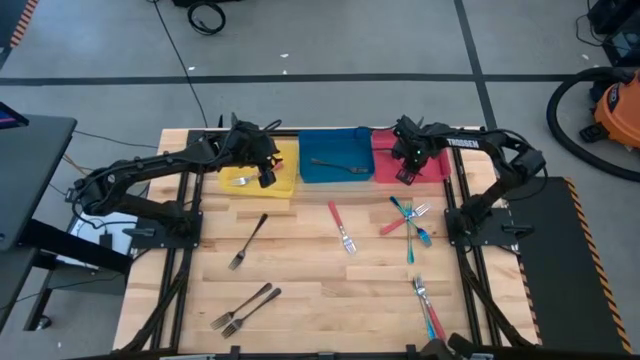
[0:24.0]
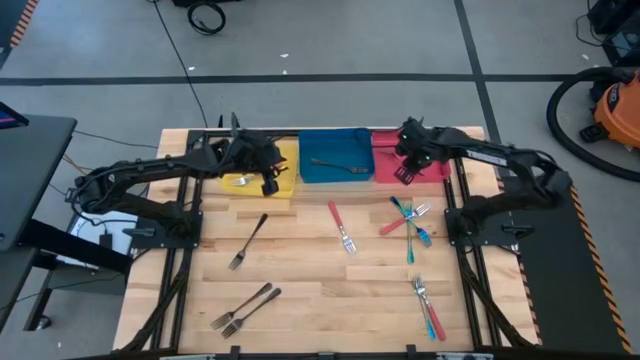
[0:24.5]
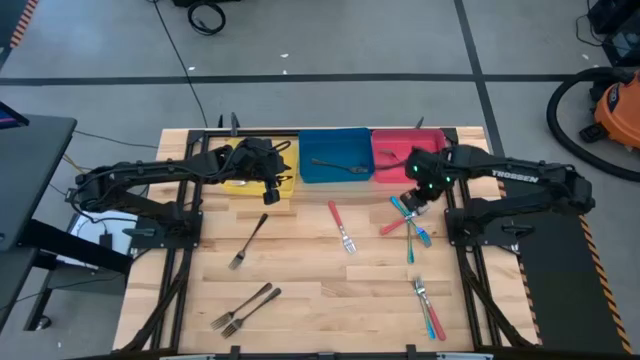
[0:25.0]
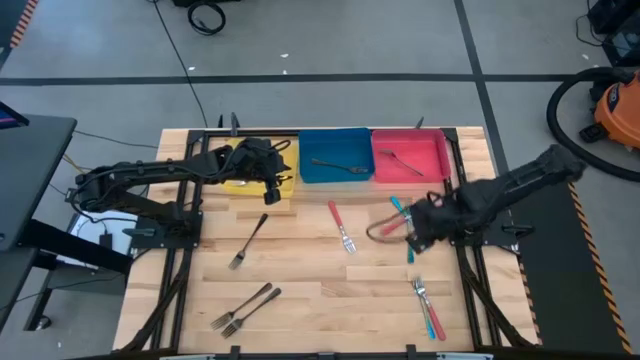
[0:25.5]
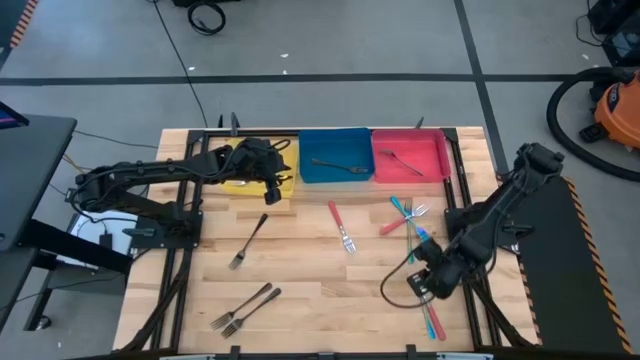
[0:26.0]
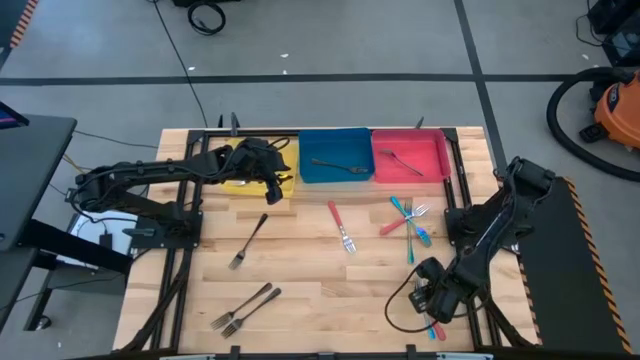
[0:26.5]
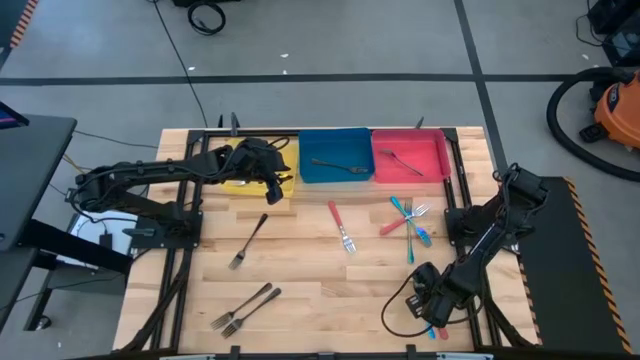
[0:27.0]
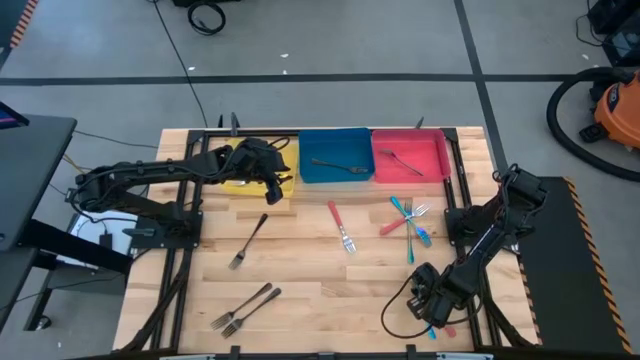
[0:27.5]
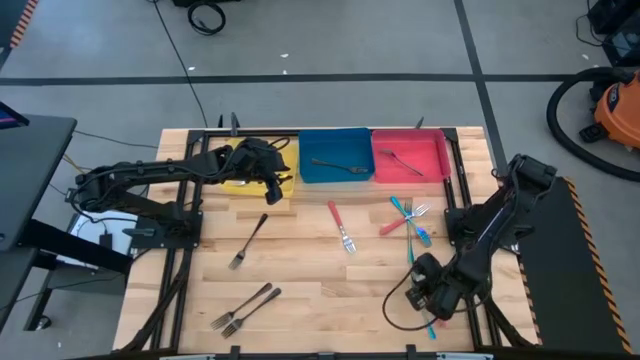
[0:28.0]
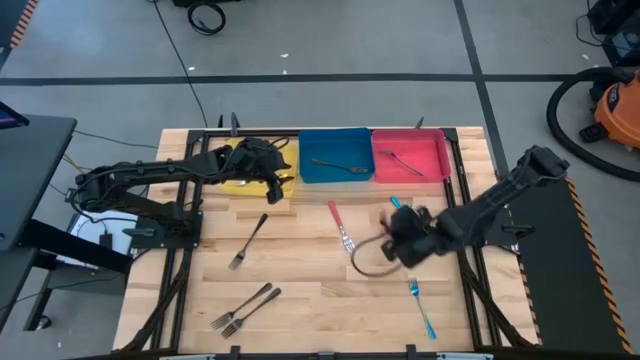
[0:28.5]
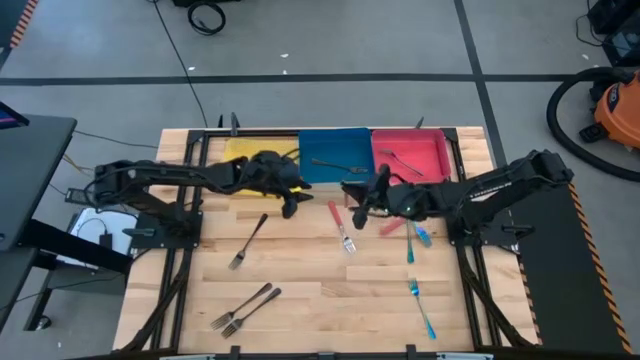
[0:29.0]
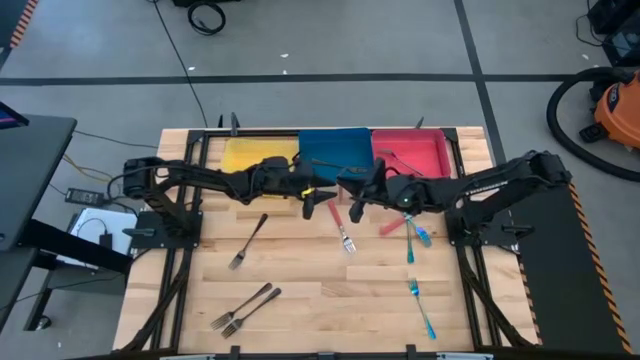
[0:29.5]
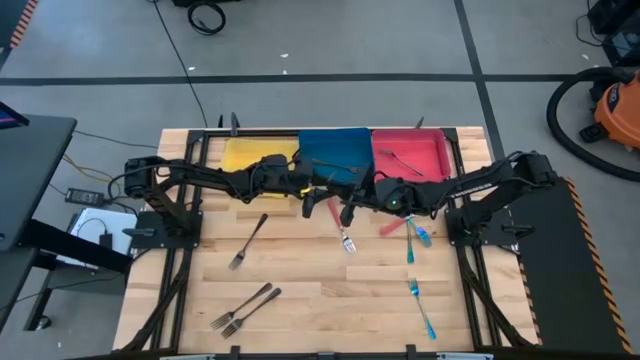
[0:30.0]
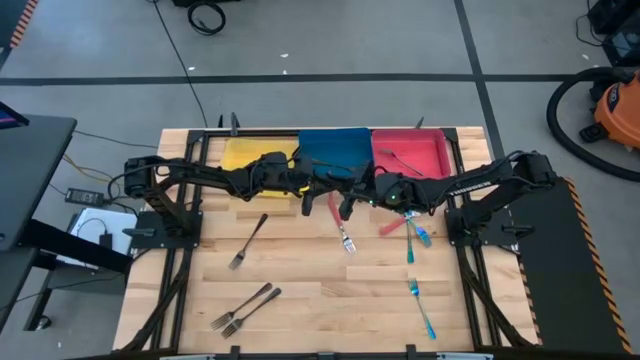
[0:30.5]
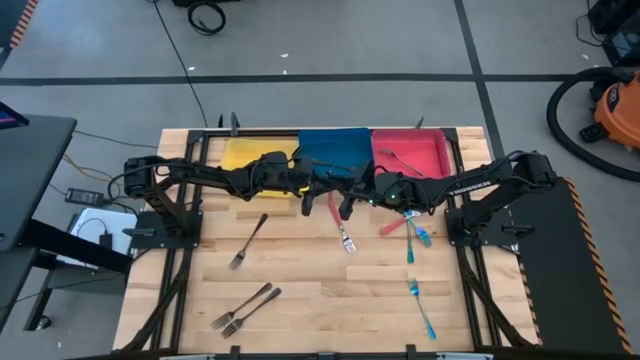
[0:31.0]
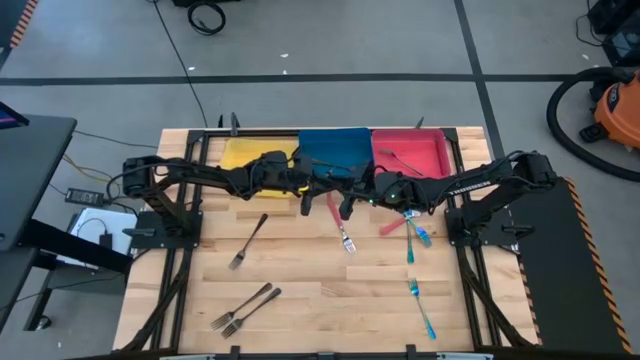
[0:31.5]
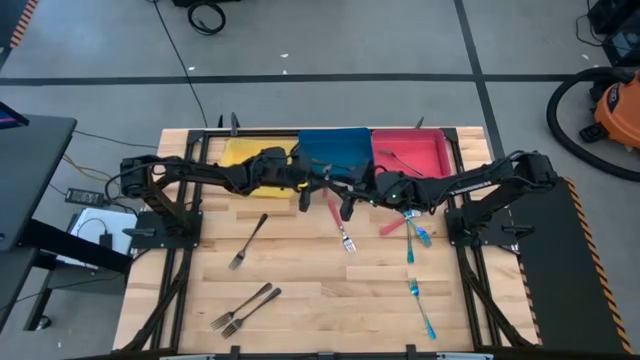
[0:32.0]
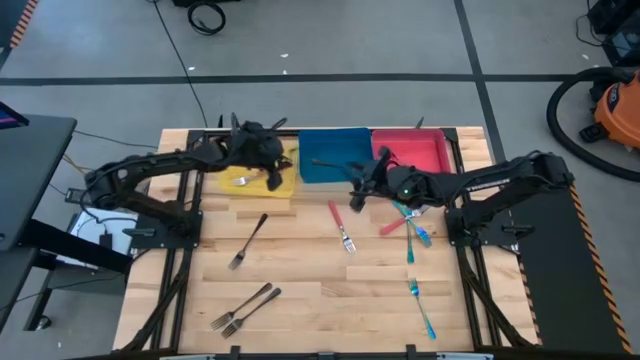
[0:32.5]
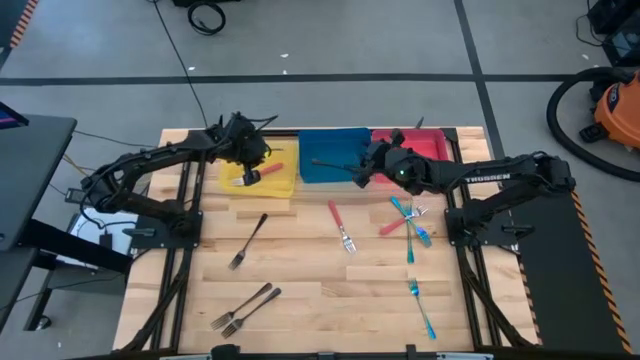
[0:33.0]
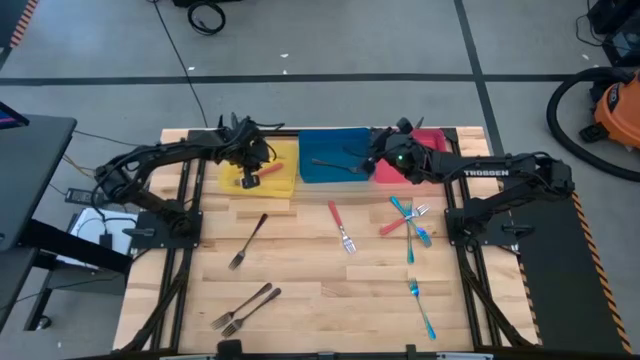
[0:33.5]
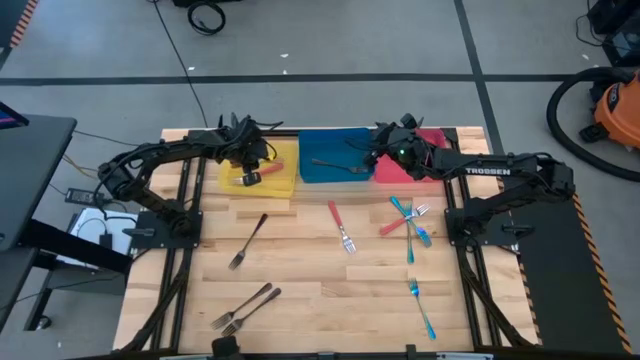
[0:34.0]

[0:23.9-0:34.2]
Task: Sort silverware by color (type)
Put the bottom right pink fork into the yellow bin

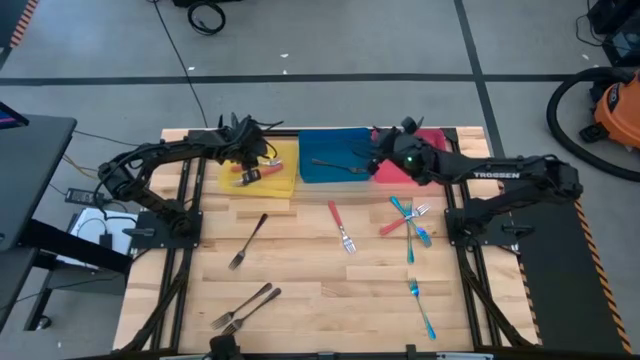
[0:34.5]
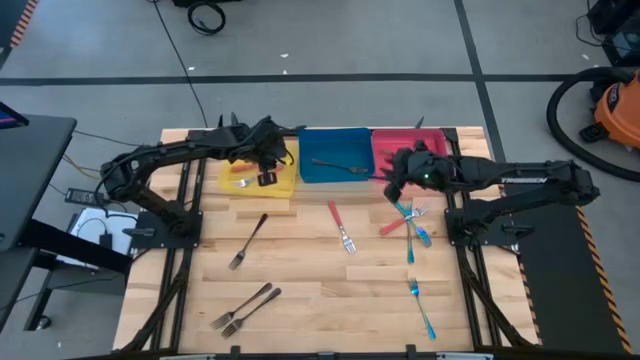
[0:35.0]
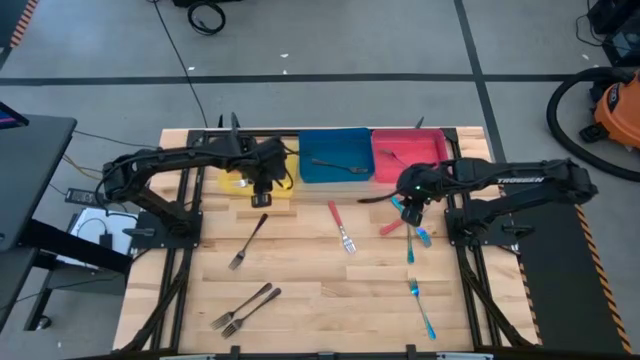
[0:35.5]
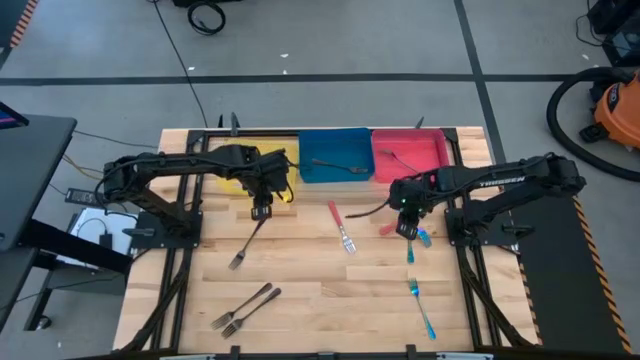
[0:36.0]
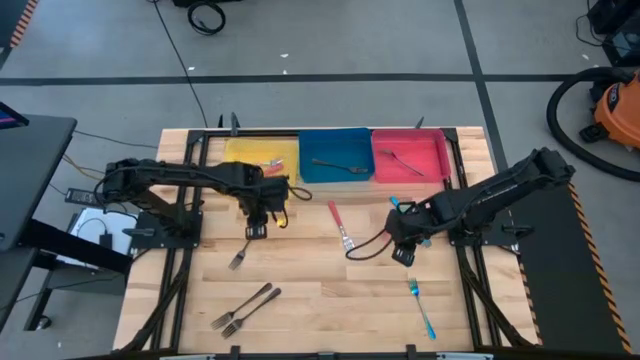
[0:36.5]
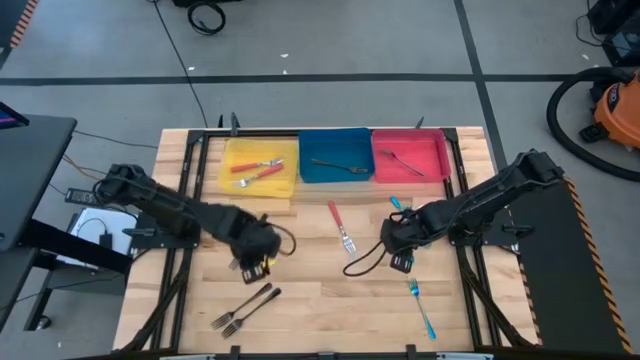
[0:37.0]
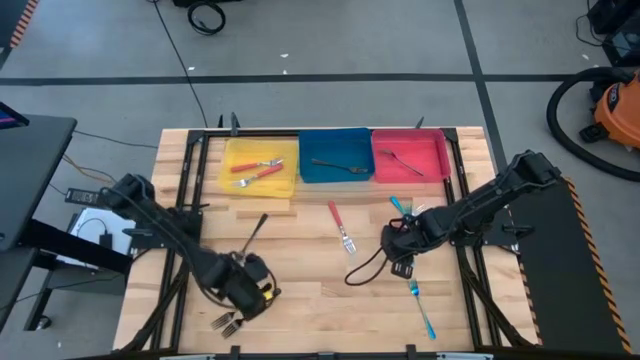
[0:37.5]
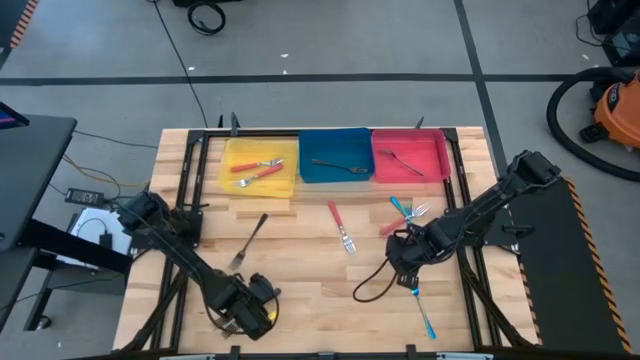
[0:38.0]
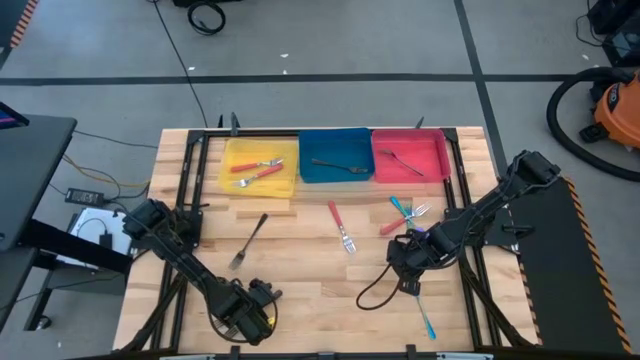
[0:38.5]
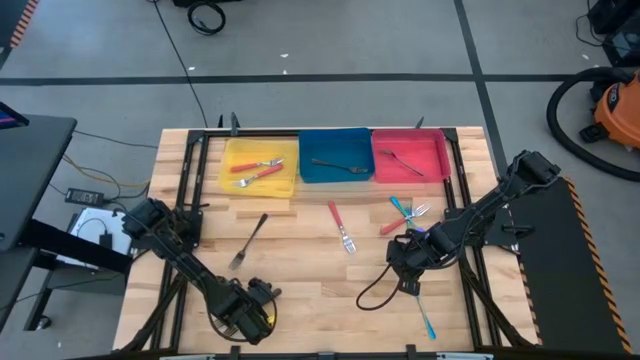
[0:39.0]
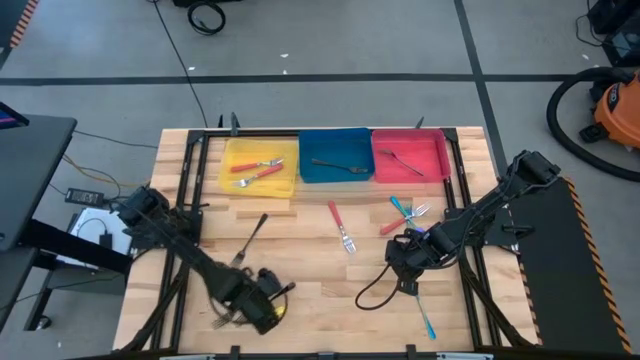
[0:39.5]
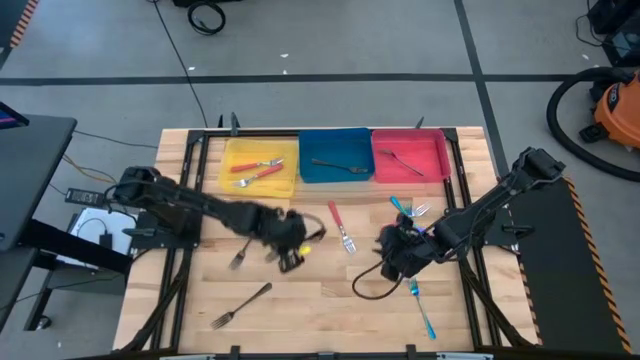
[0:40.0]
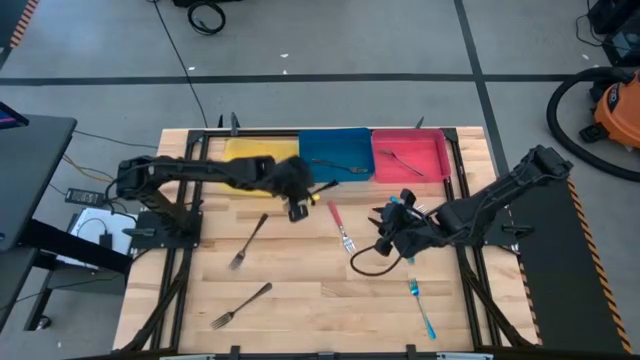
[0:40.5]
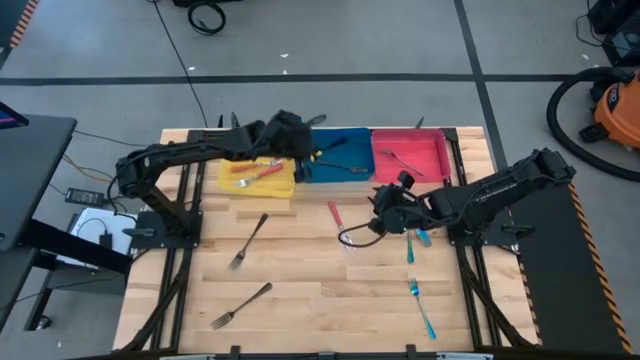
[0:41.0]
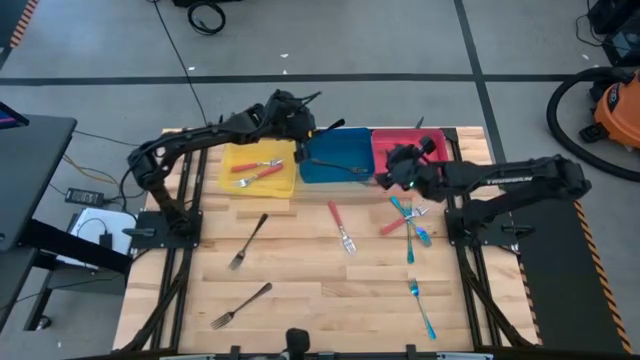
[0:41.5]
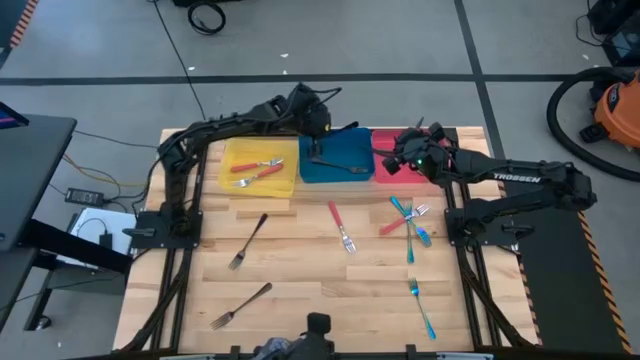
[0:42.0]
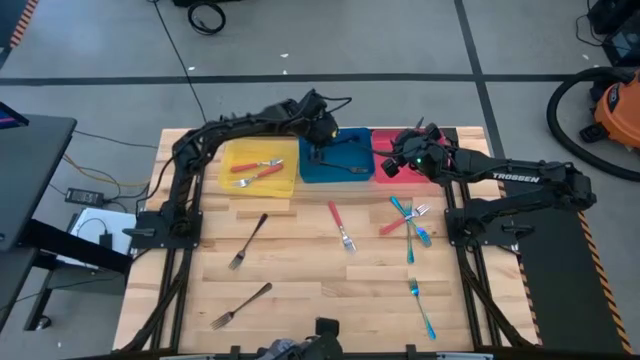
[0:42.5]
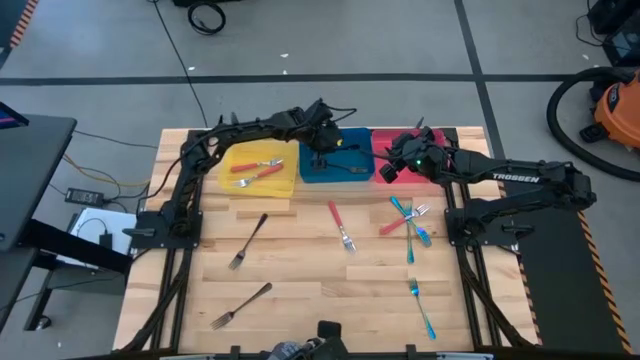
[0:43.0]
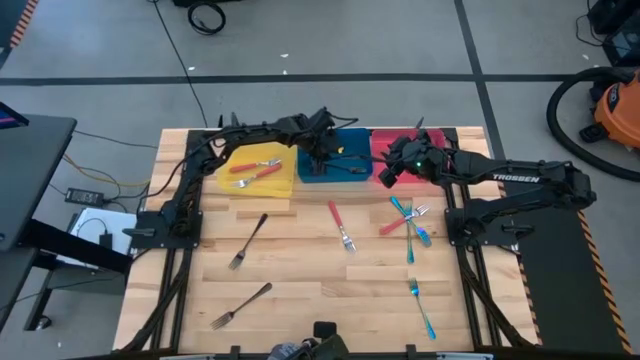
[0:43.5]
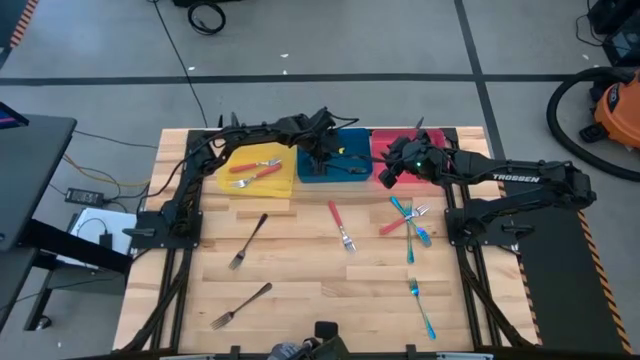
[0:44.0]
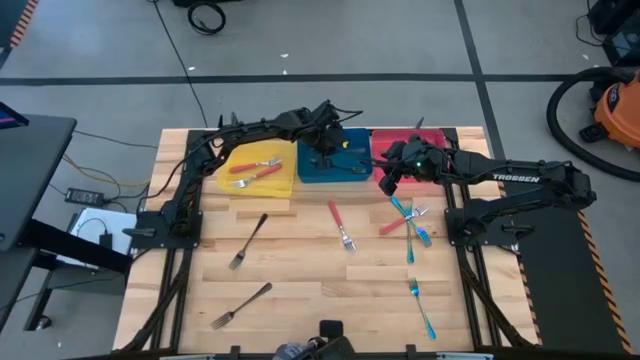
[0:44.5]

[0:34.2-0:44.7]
Put the bottom right black fork into the blue bin
